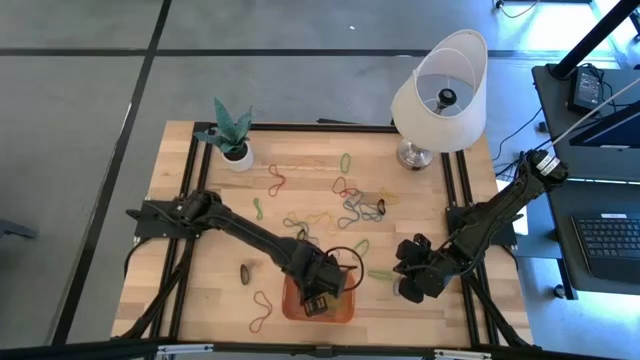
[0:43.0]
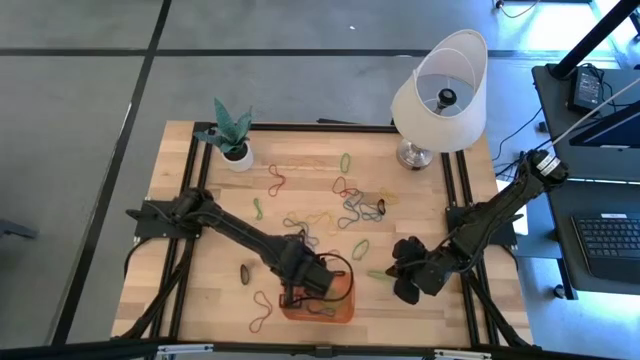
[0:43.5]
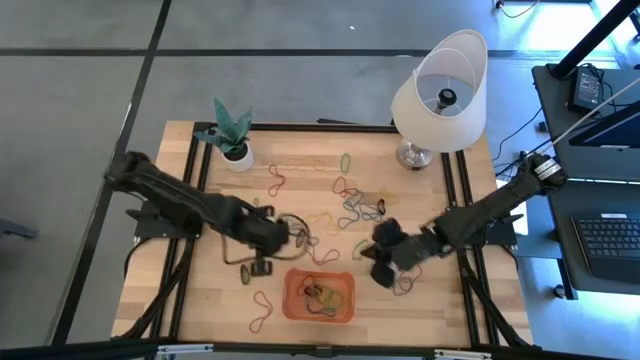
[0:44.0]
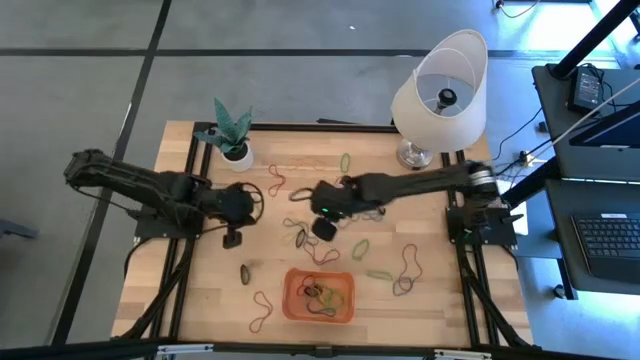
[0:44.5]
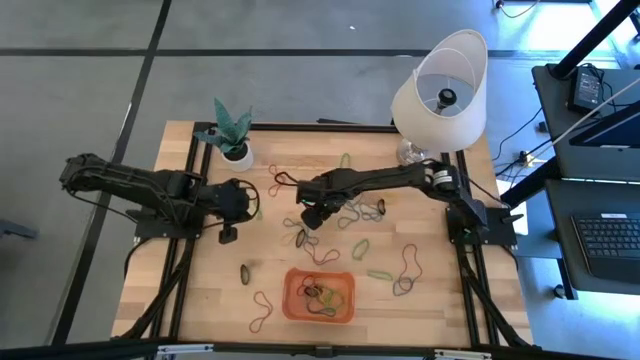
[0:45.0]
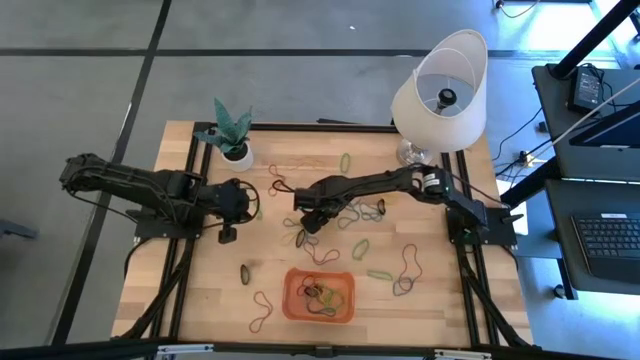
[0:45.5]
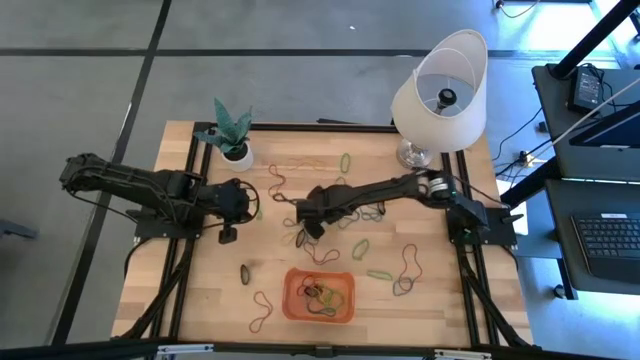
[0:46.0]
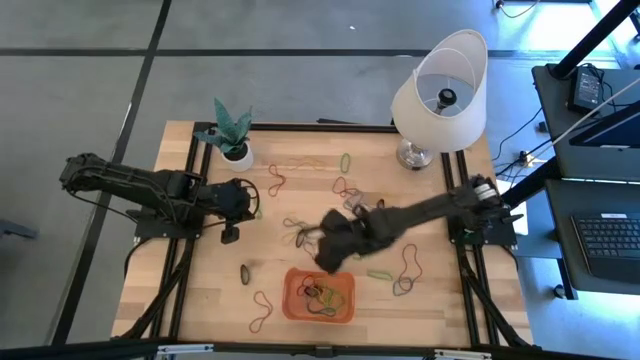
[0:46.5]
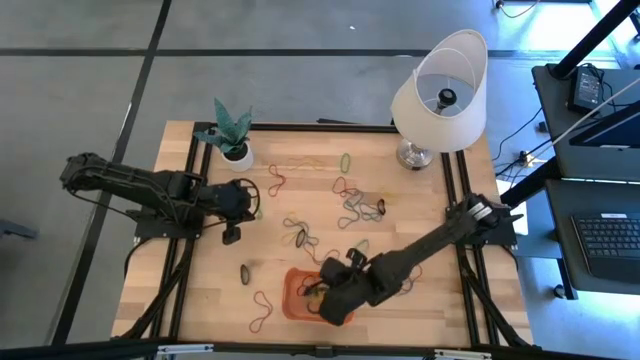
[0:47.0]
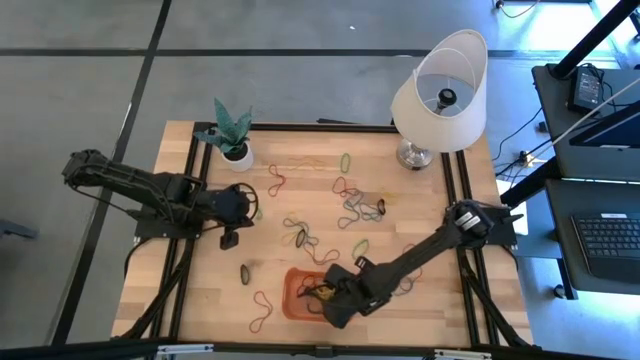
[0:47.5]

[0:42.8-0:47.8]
Task: Pick and place rubber bands into bin
Put the yellow rubber band into the bin

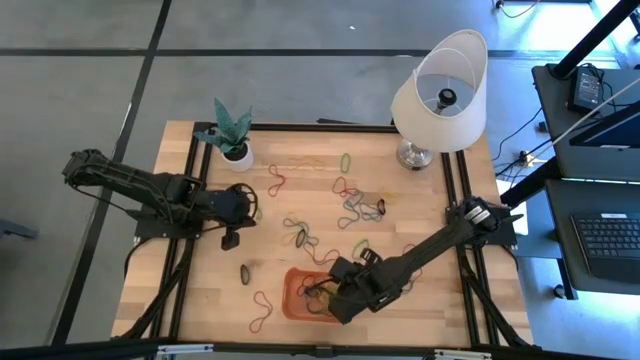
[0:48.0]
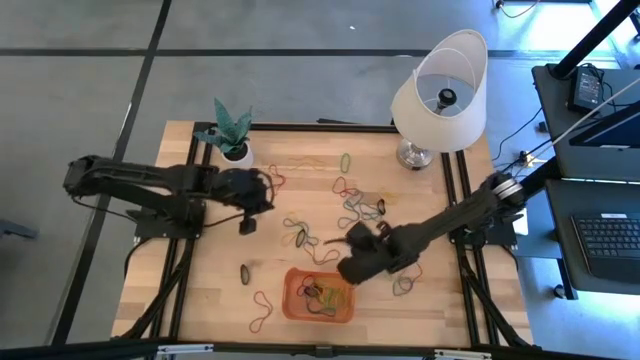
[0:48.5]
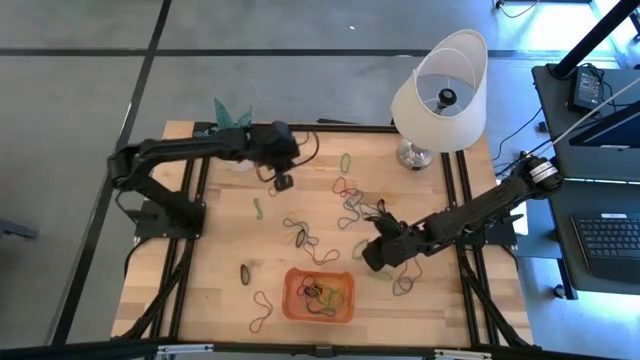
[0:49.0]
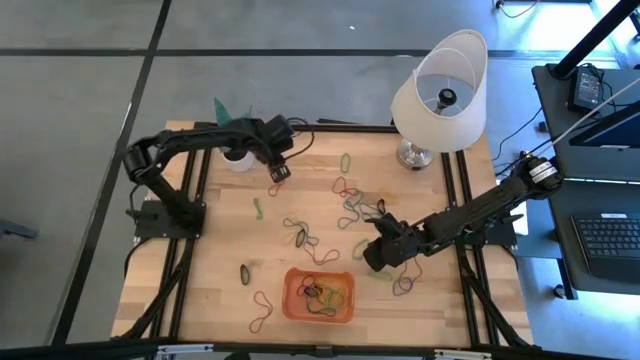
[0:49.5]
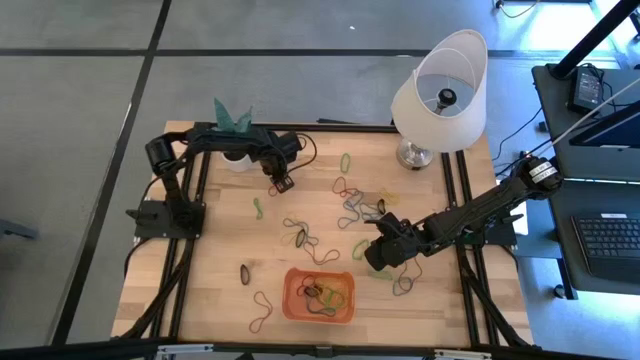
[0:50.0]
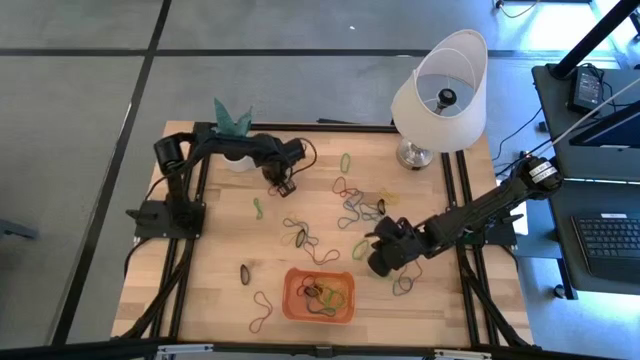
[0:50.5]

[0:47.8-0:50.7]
Put the red rubber band into the bin

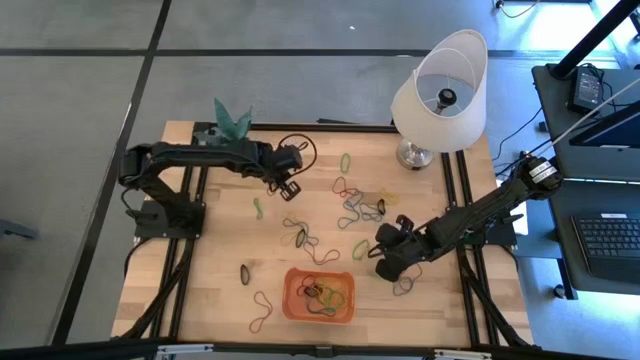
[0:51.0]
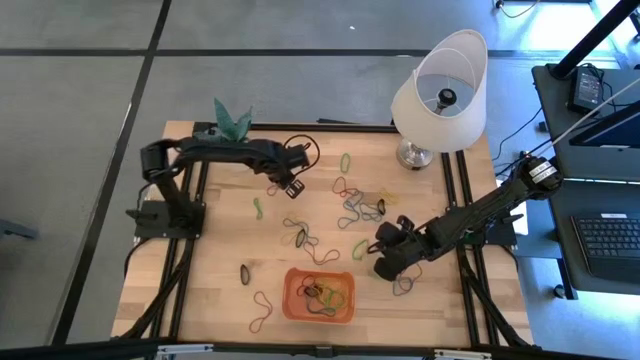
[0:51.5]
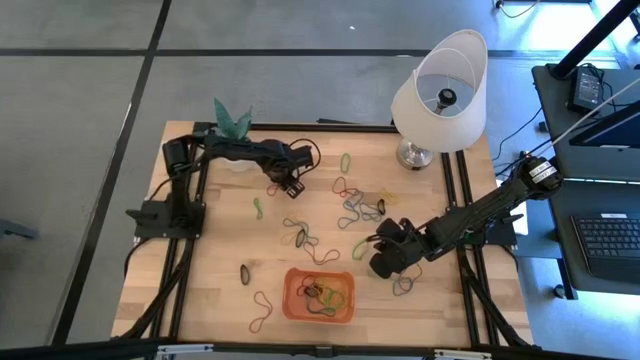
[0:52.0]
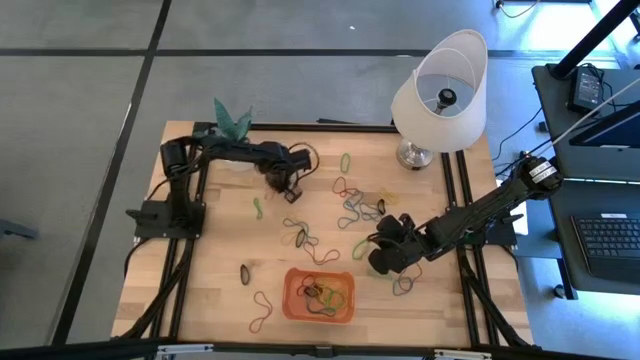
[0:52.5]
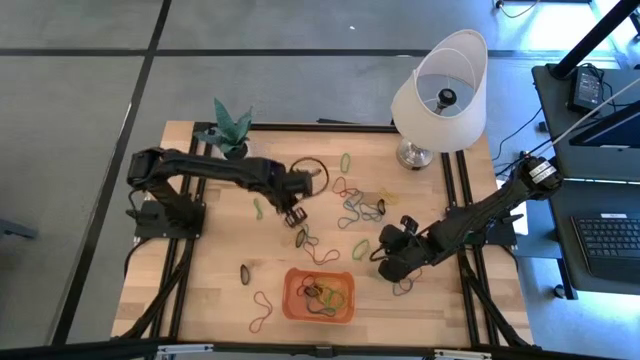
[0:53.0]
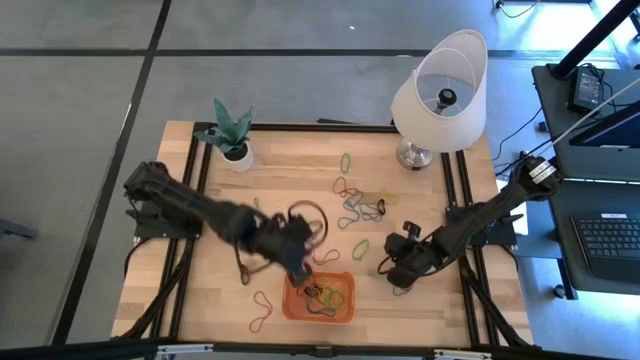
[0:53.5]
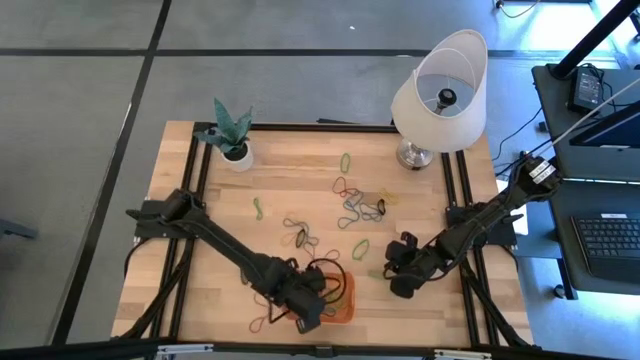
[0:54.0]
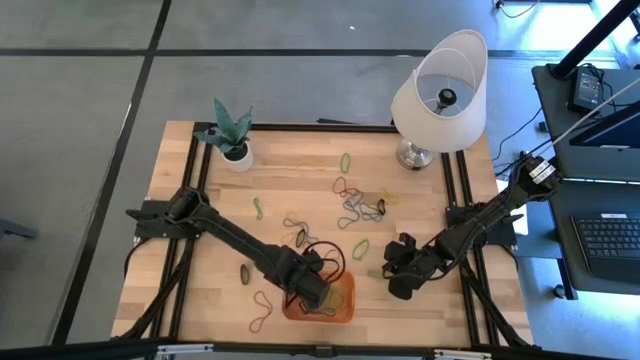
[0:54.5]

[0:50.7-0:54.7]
Put the red rubber band into the bin

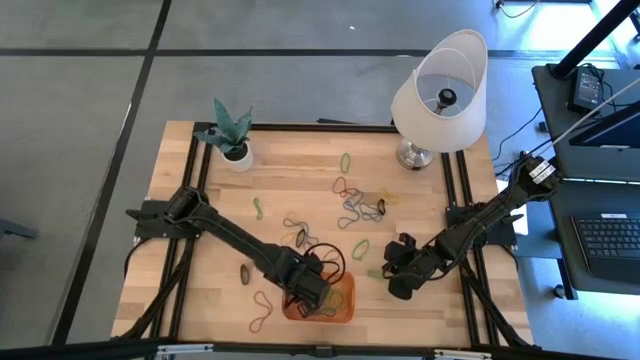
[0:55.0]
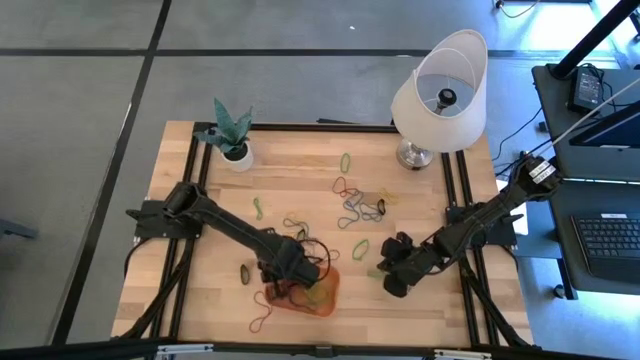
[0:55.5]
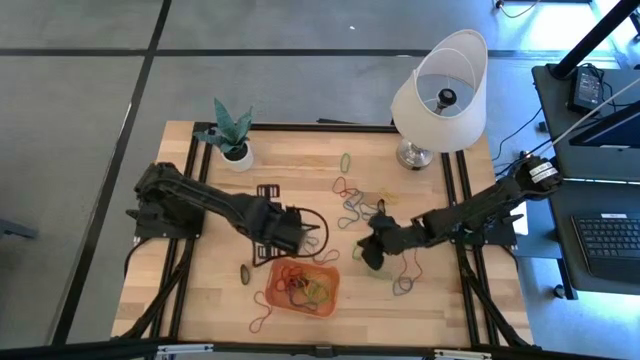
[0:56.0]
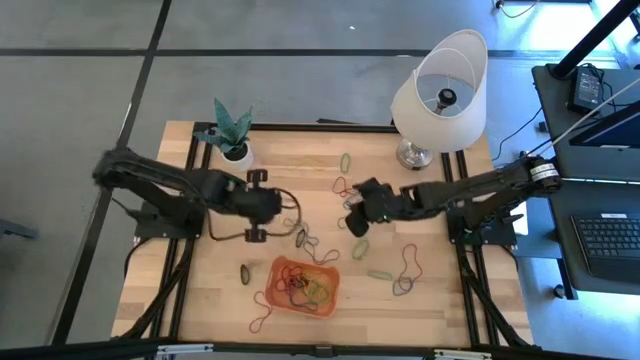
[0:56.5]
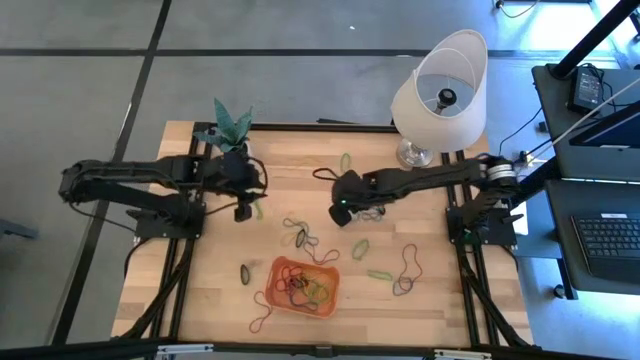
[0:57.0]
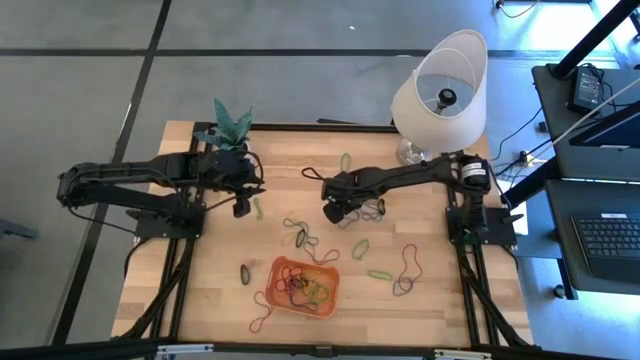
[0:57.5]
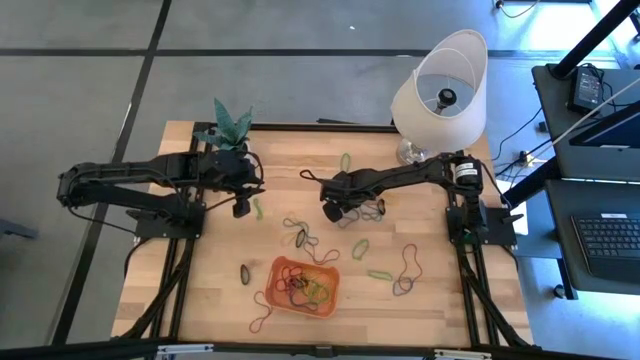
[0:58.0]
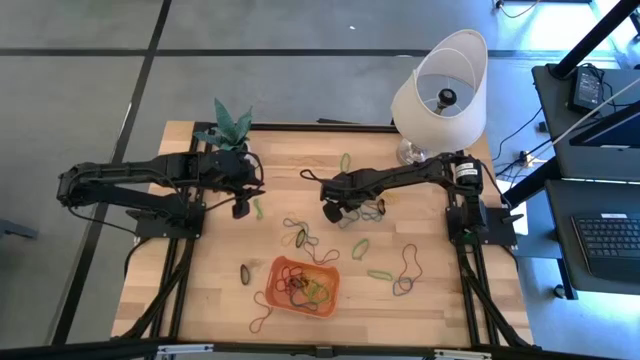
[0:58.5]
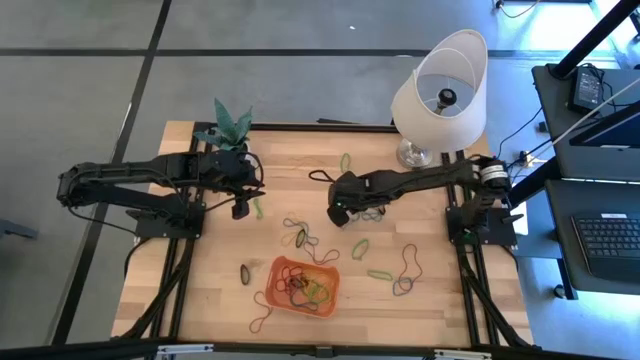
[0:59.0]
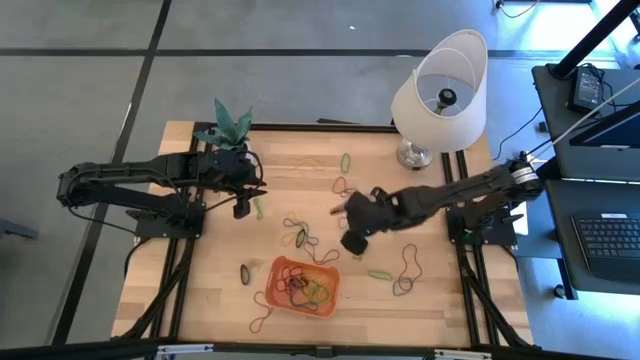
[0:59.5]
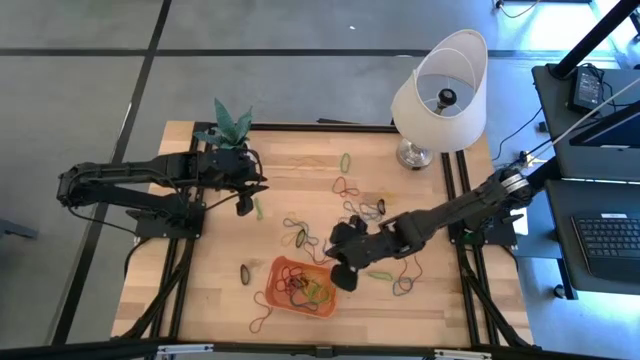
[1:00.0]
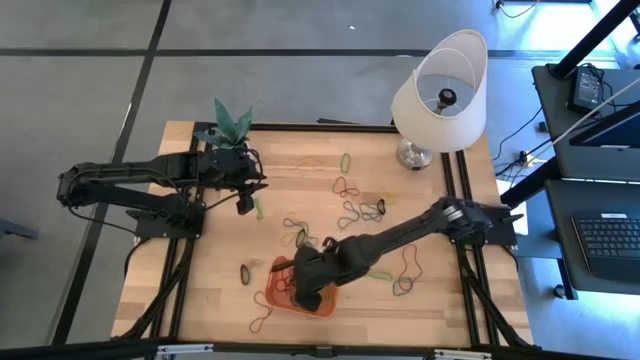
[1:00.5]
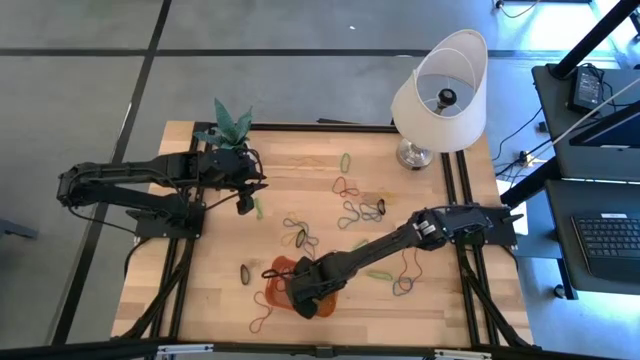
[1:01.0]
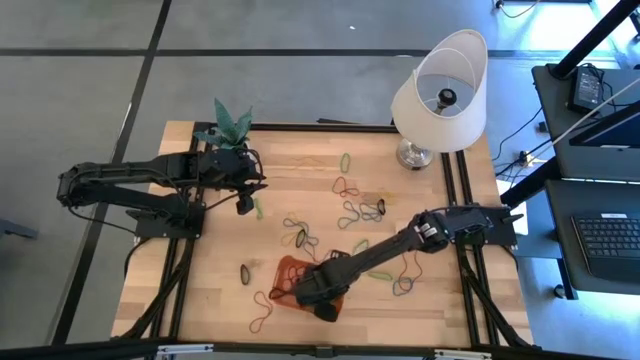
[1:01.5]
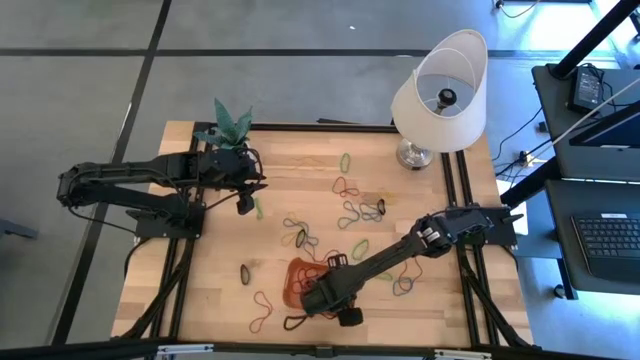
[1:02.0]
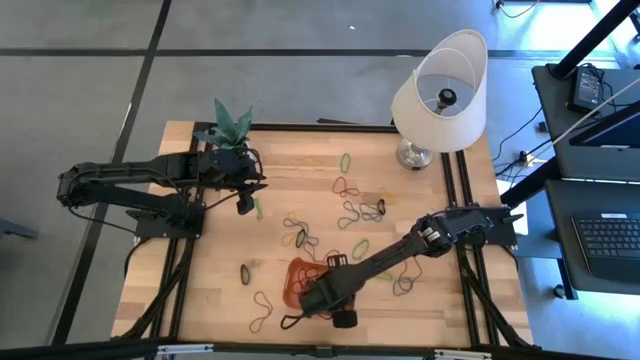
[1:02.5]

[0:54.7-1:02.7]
Put the blue rubber band into the bin

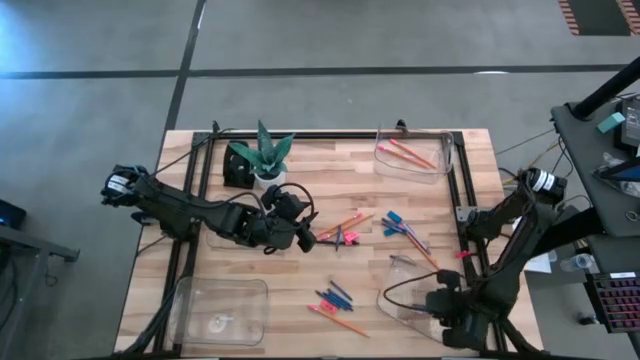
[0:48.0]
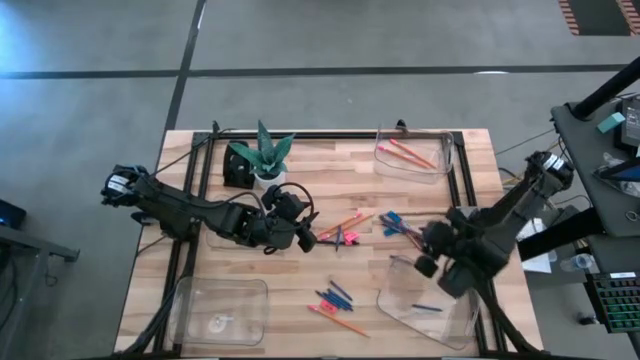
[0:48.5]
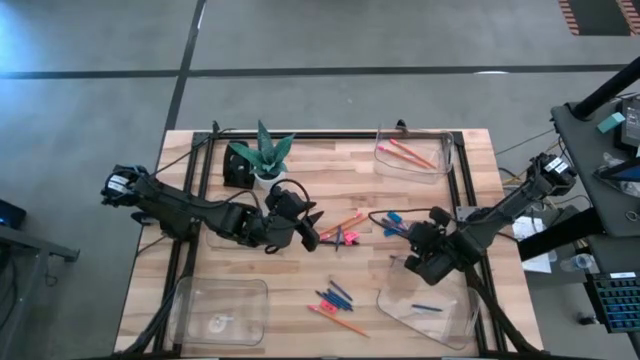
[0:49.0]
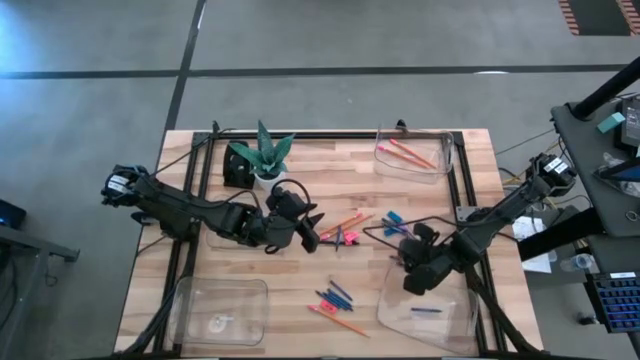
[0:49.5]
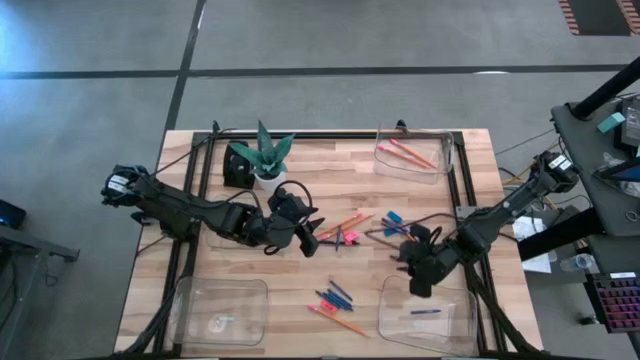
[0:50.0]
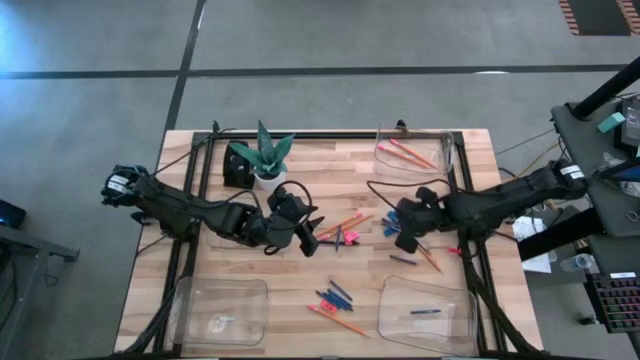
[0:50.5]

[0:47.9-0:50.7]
Task: Sort crayons/erasers/pens/pencils in bins
Adjust the bottom right transparent bin
